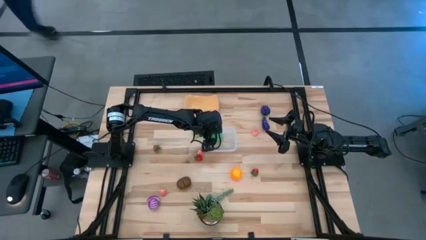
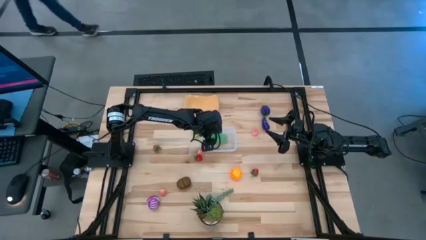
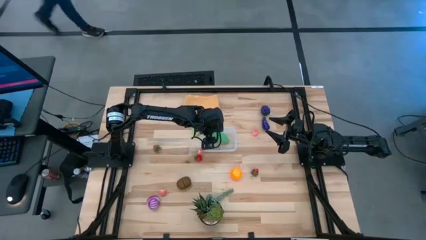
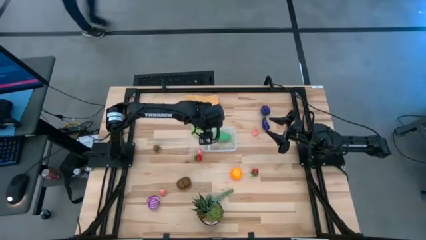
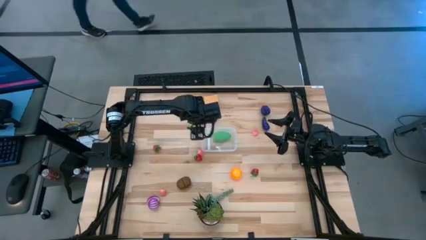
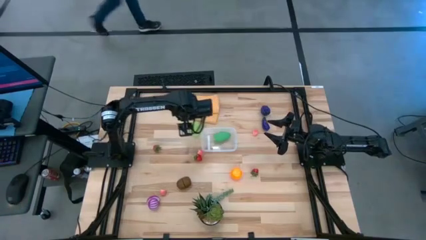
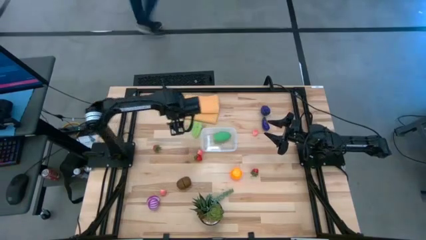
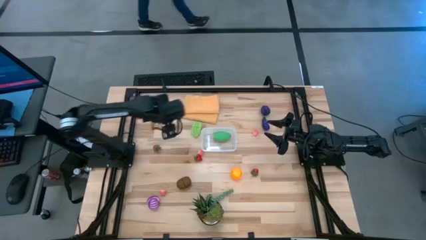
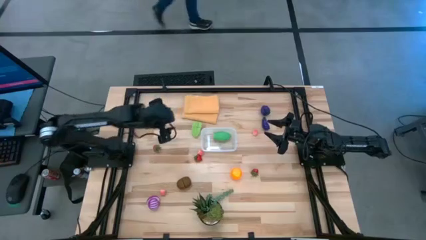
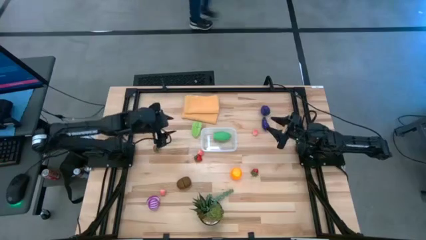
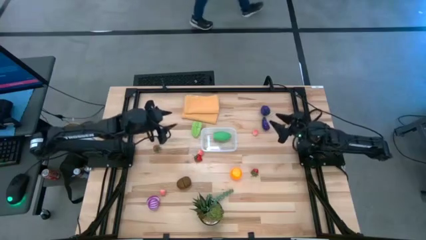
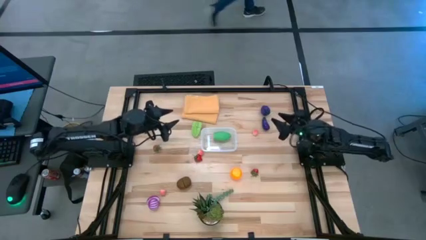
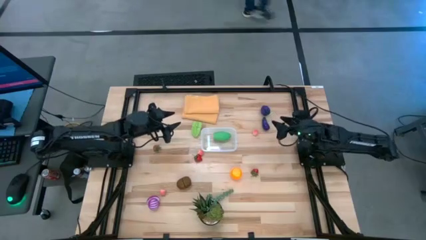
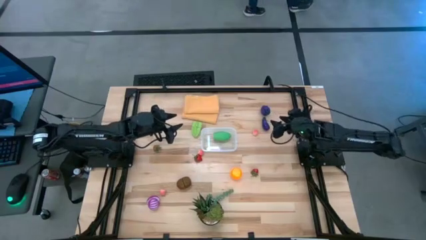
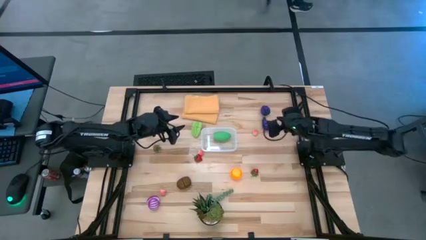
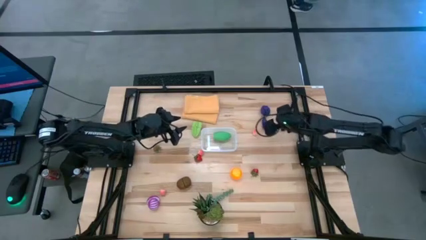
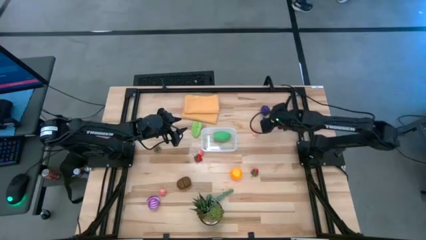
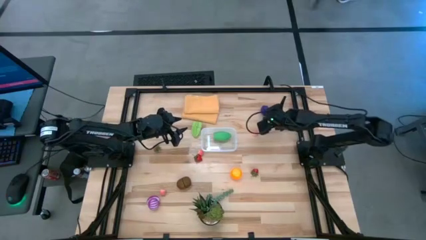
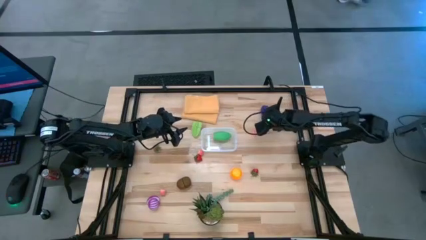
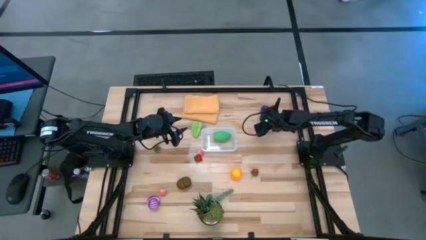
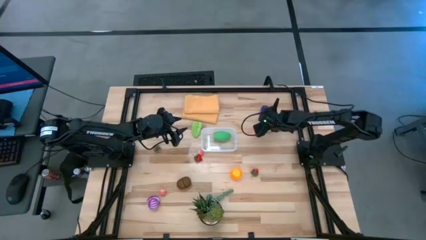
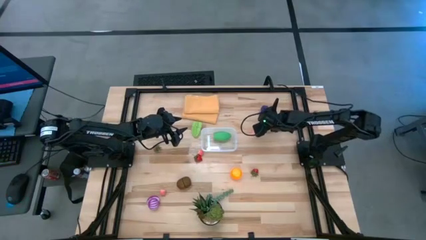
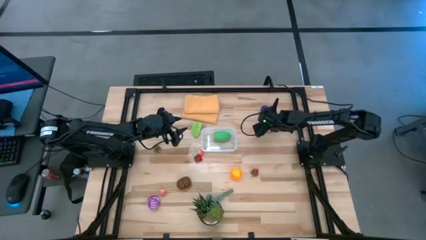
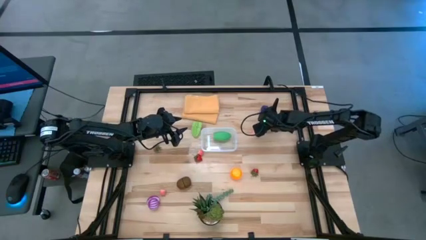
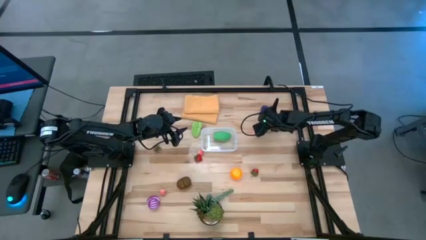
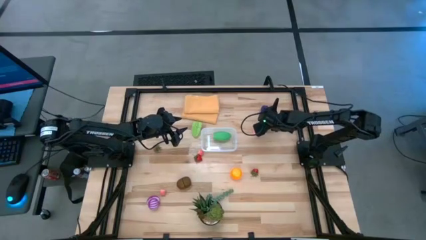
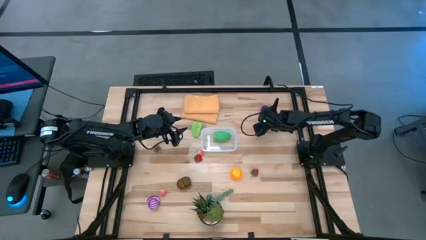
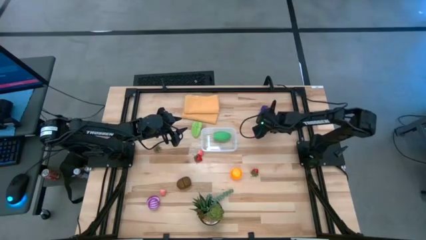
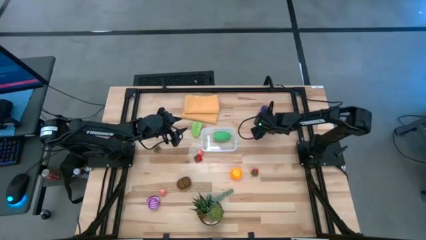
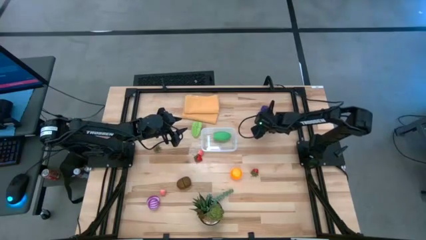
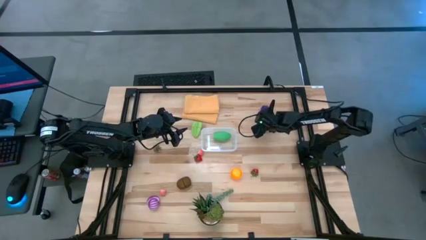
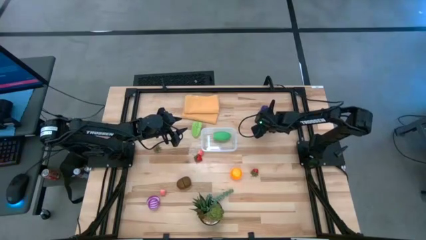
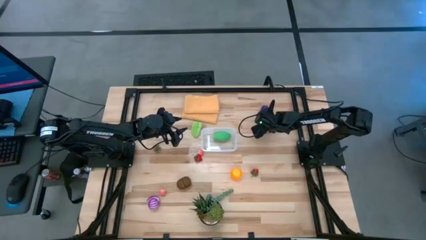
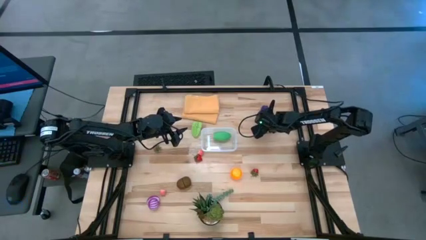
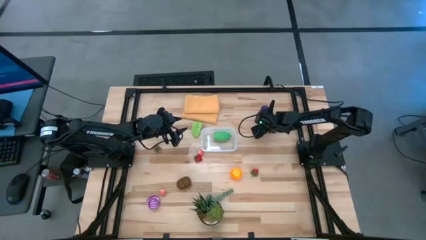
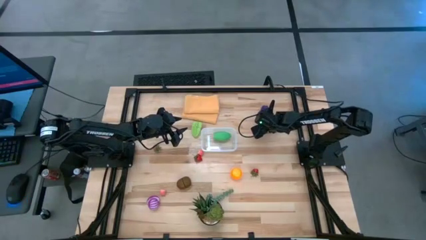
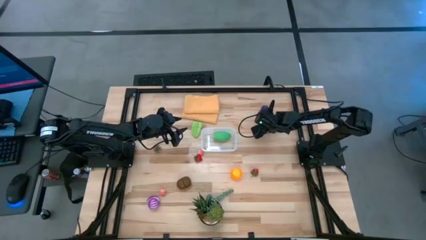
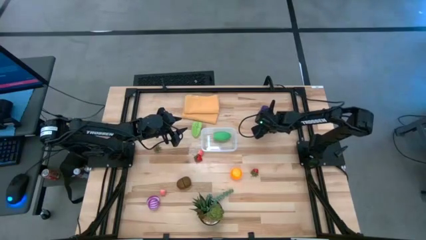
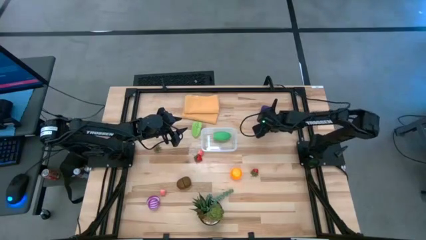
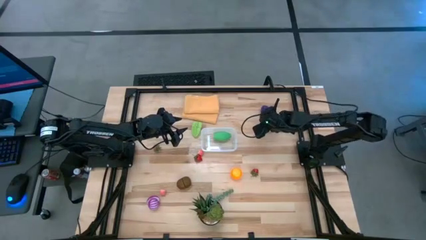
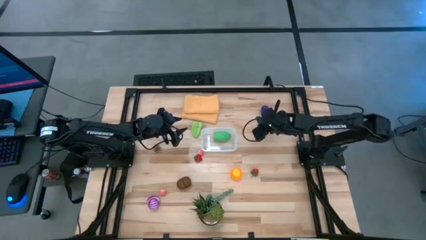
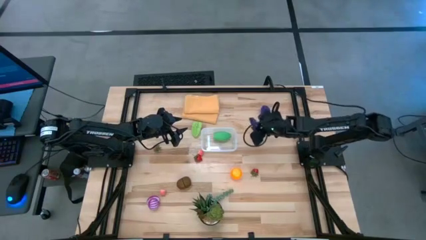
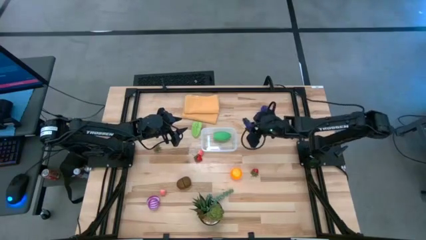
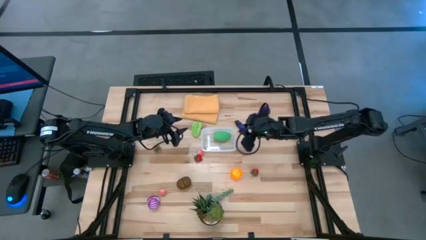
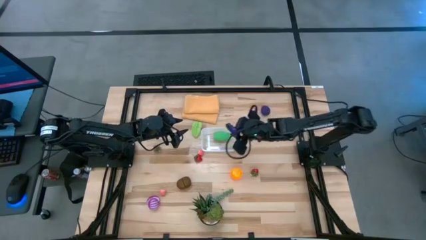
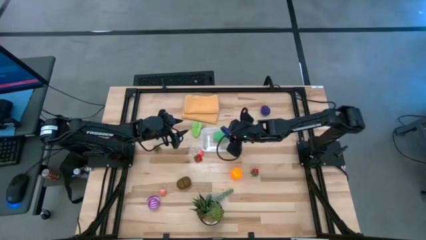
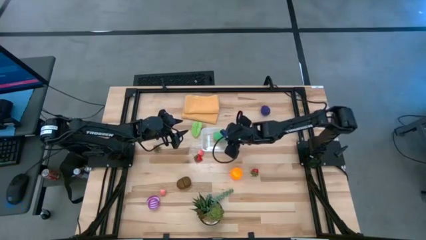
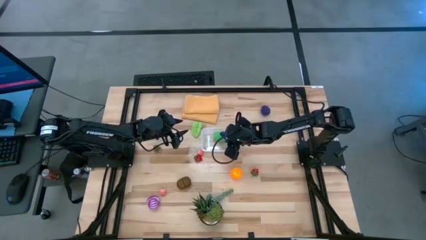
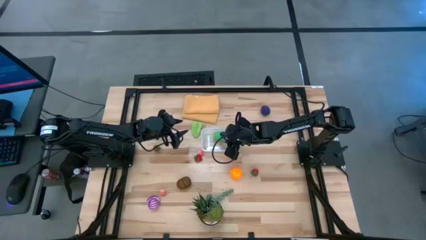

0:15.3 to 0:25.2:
Task: Pick and placing Produce into tupperware
Put the violet eggplant into the transparent container

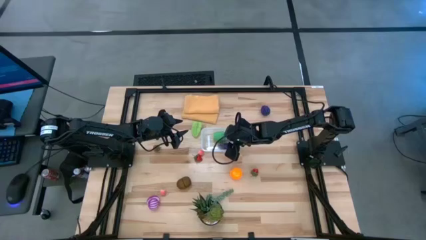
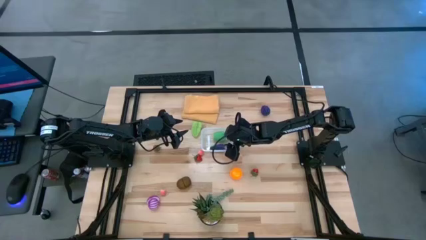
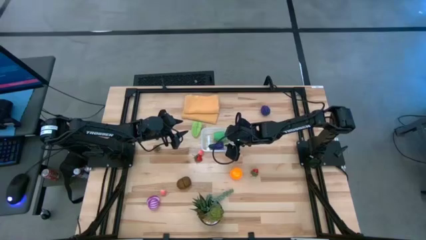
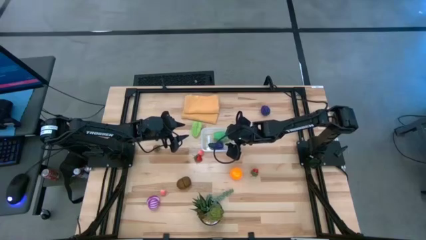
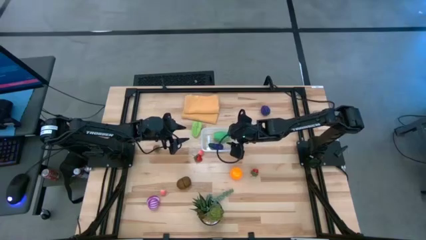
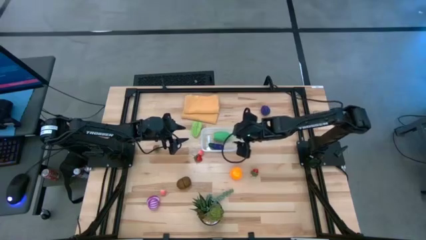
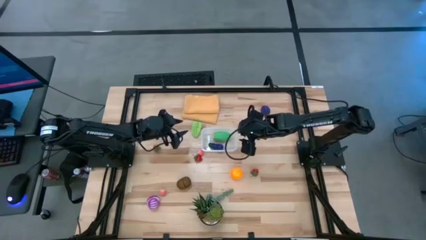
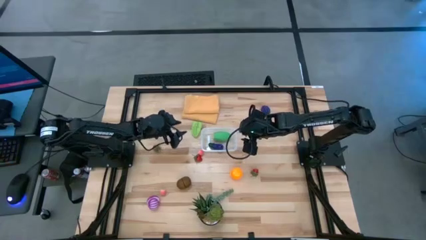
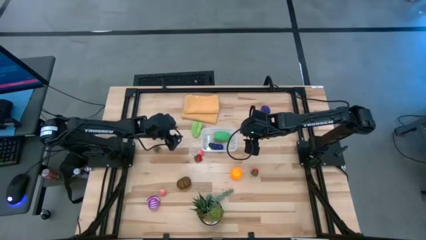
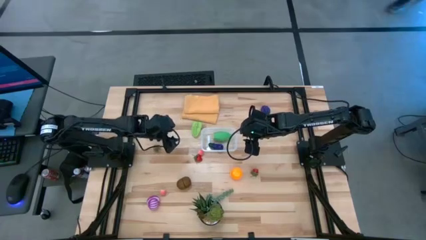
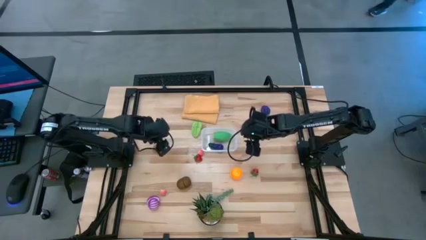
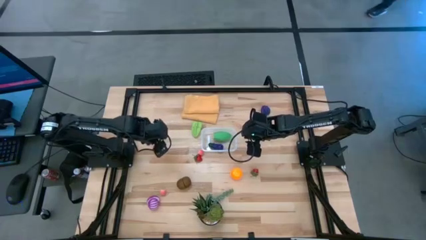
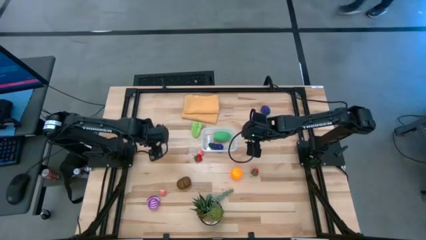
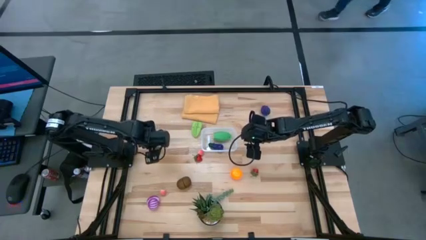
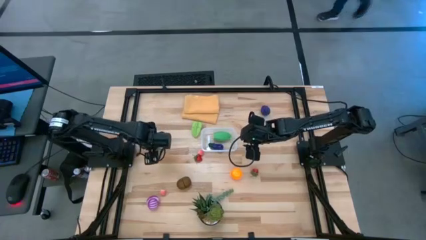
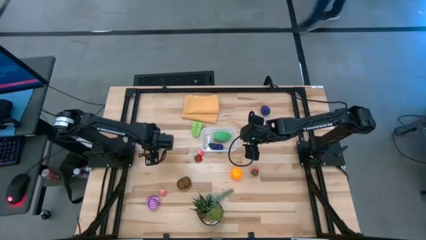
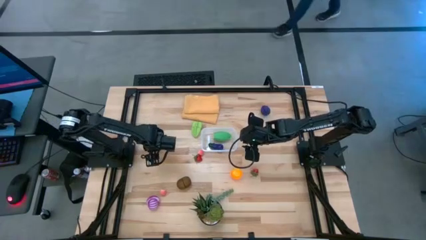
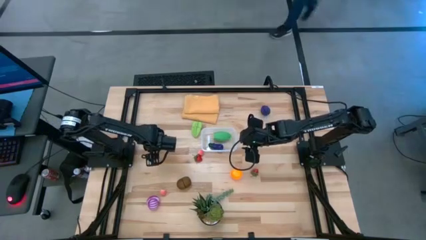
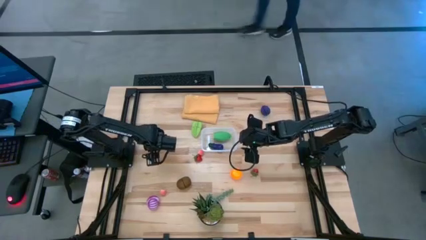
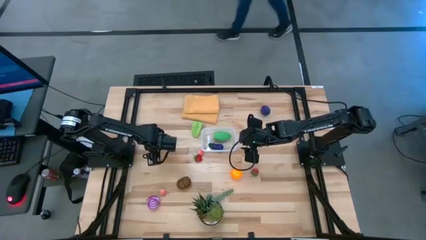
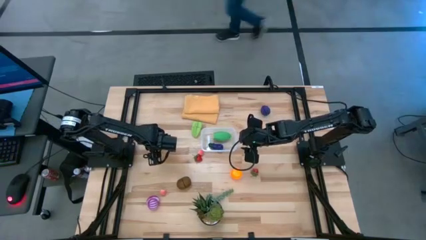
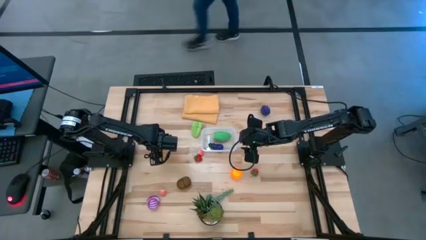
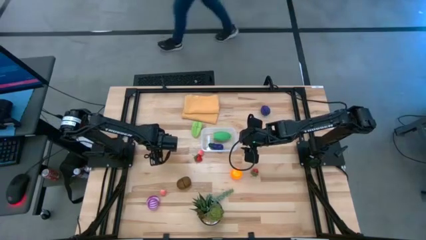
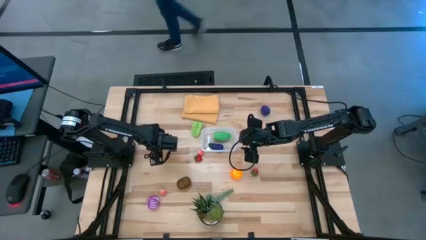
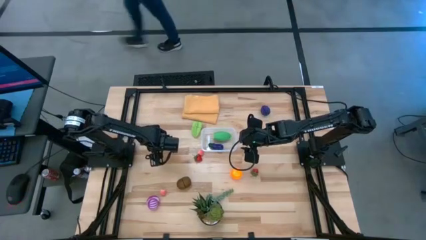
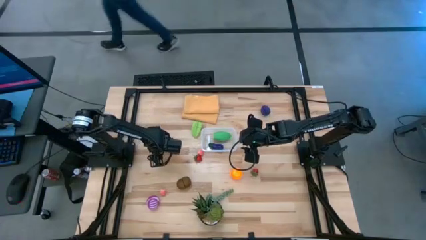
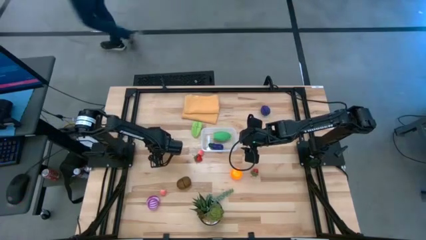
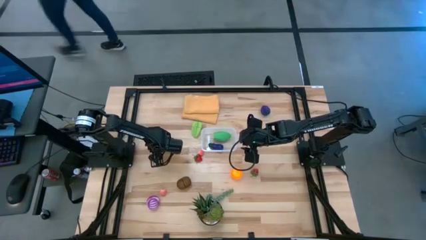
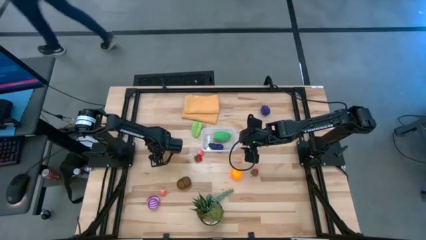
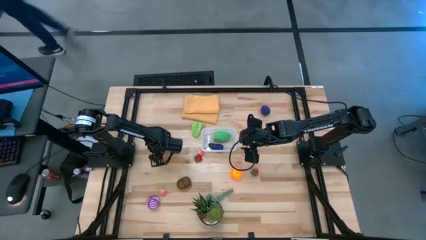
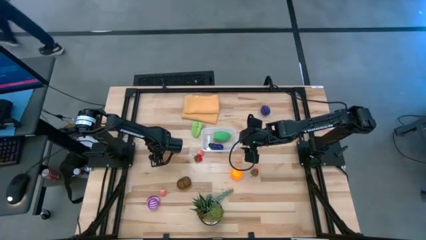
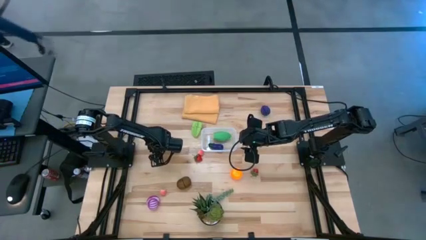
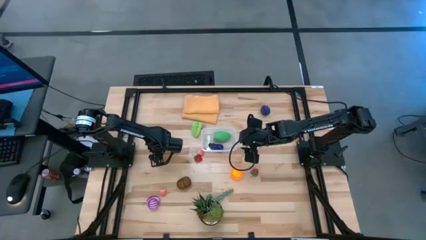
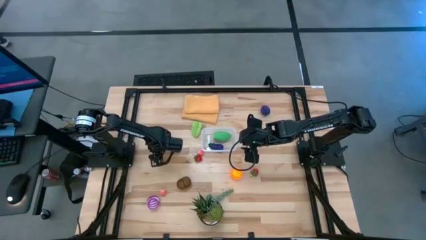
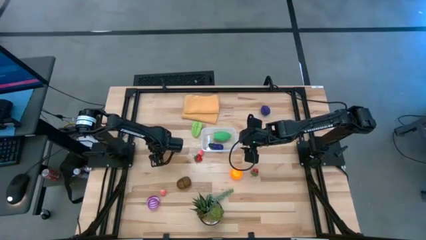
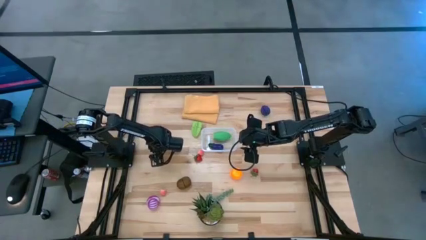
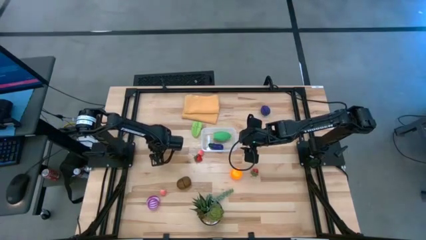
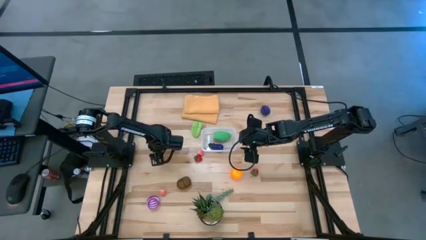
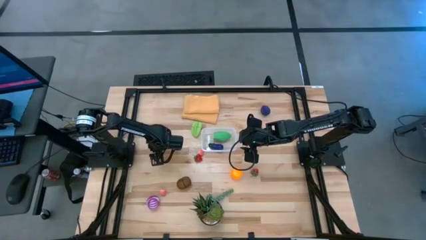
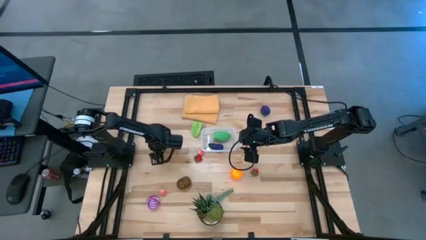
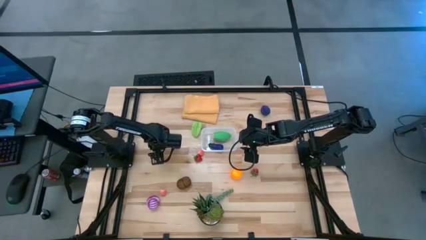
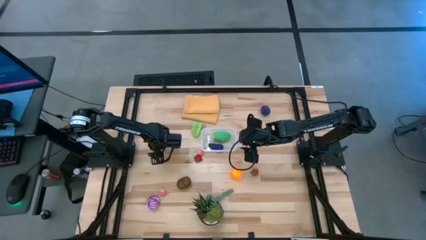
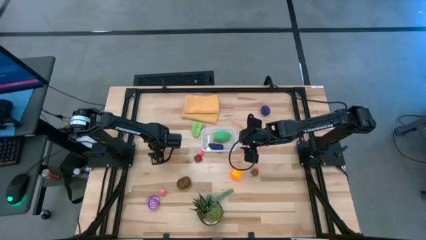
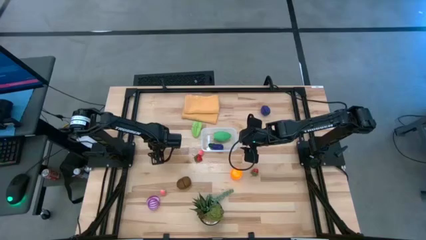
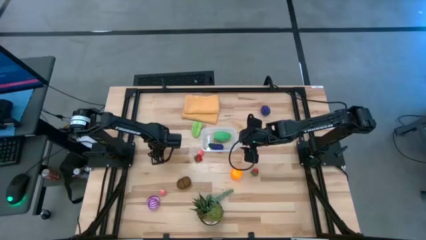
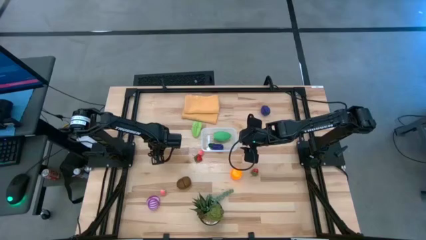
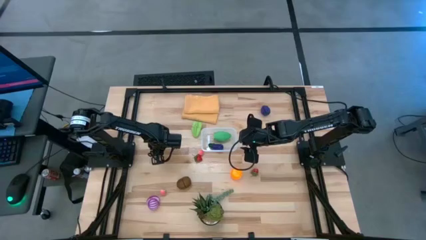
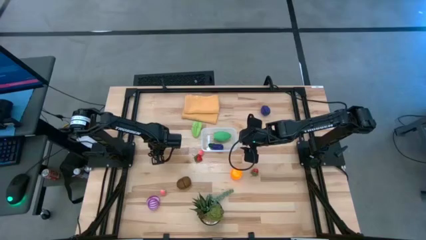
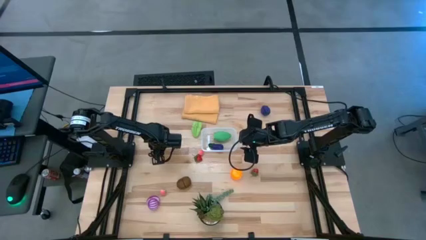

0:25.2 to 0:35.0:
Put the left red strawberry into the transparent container
